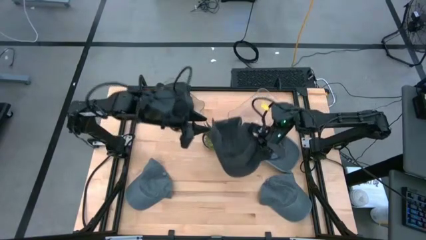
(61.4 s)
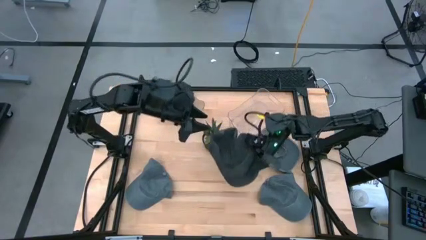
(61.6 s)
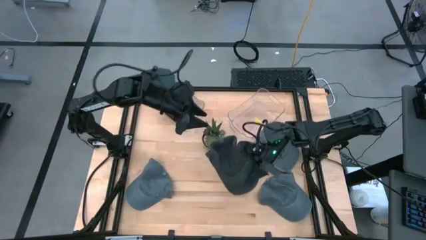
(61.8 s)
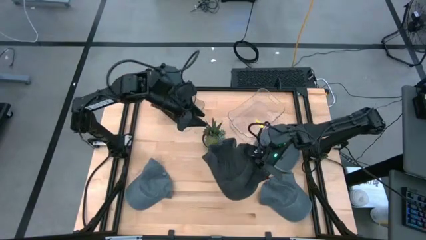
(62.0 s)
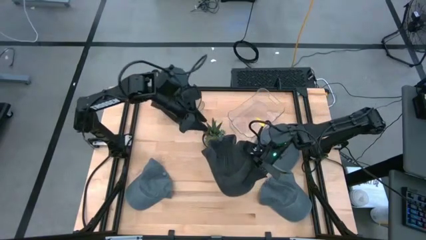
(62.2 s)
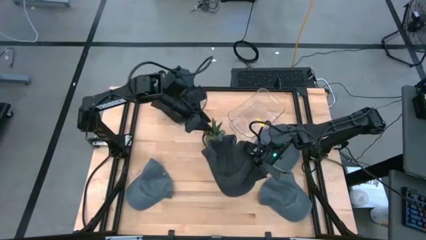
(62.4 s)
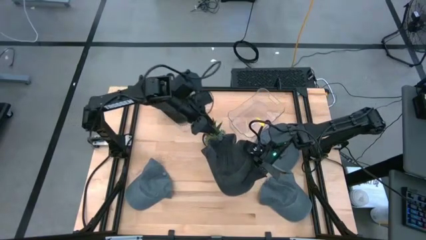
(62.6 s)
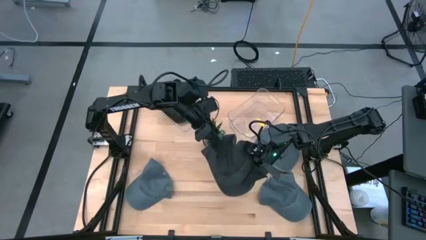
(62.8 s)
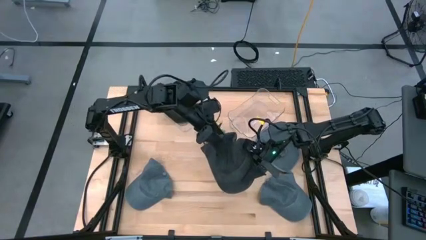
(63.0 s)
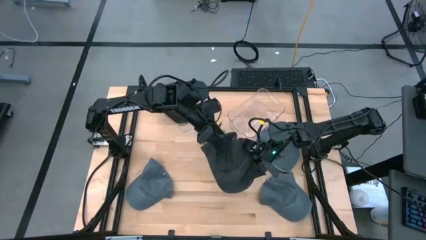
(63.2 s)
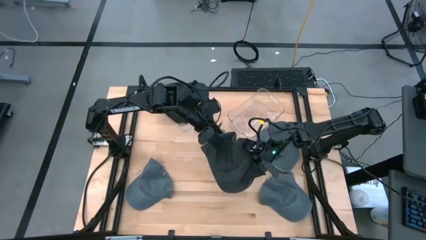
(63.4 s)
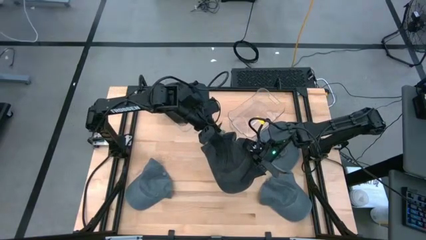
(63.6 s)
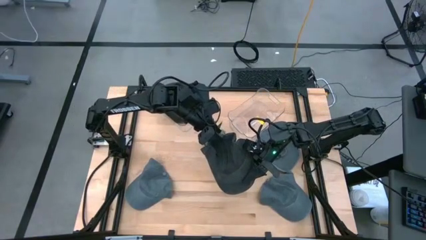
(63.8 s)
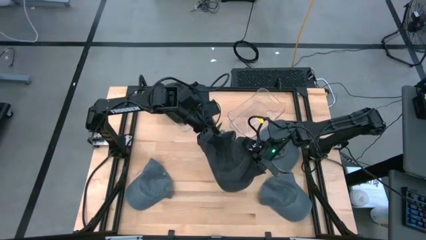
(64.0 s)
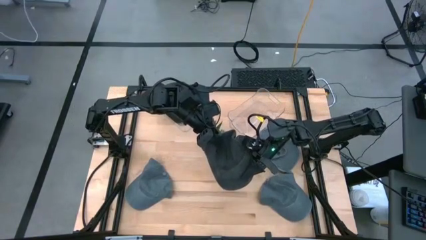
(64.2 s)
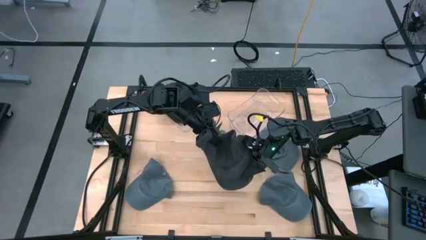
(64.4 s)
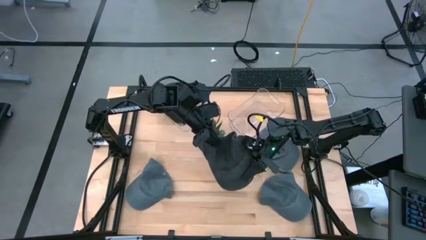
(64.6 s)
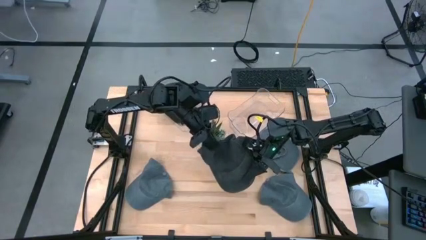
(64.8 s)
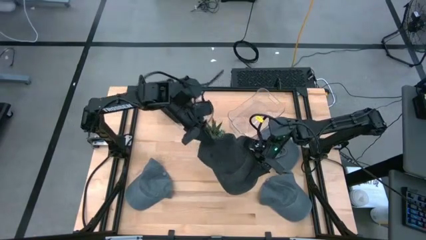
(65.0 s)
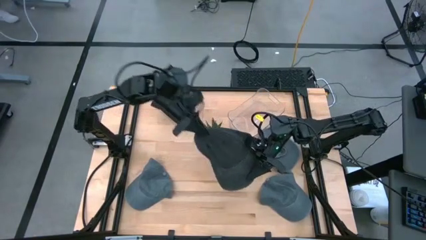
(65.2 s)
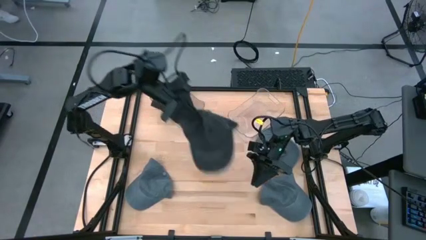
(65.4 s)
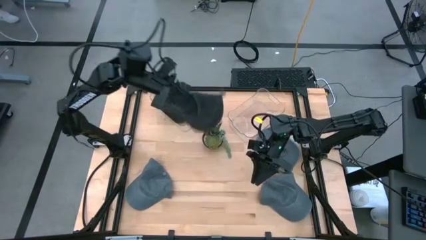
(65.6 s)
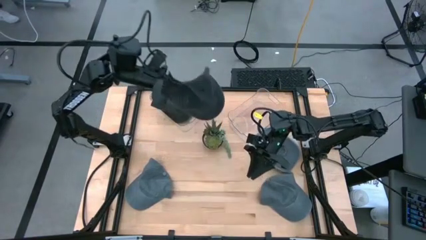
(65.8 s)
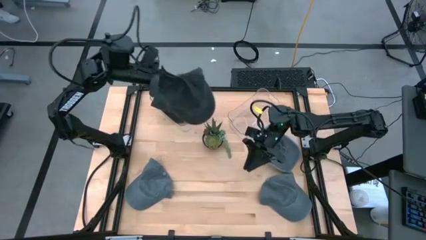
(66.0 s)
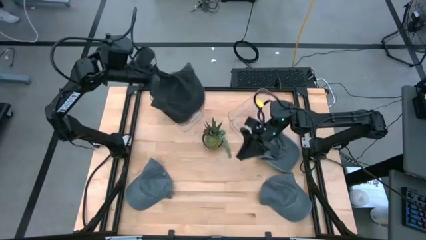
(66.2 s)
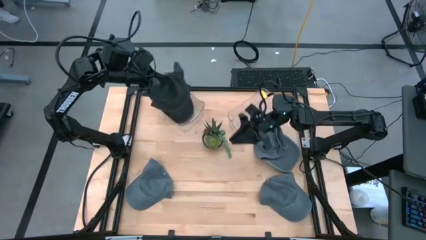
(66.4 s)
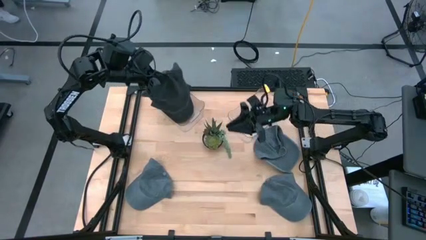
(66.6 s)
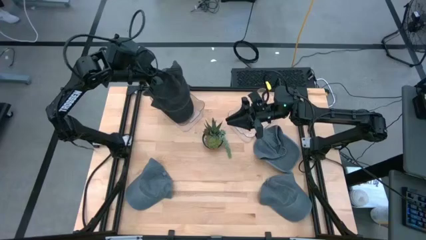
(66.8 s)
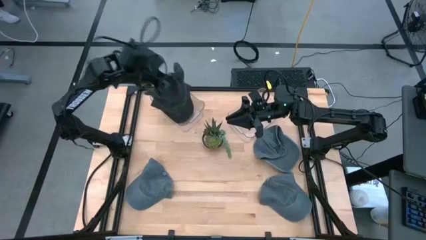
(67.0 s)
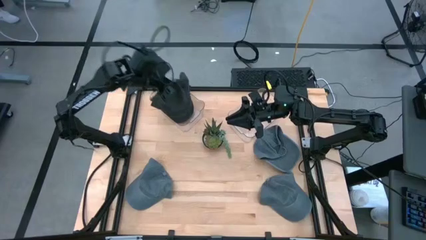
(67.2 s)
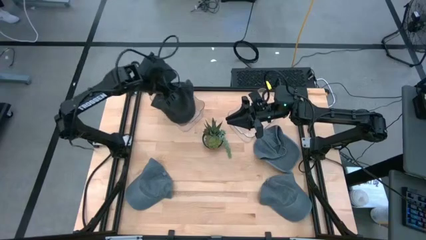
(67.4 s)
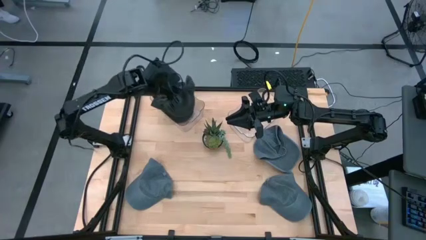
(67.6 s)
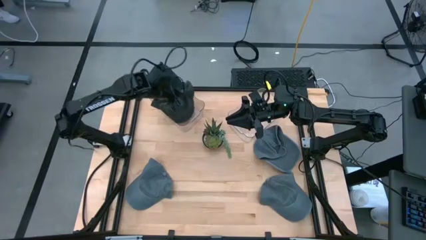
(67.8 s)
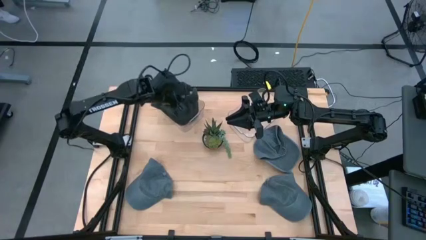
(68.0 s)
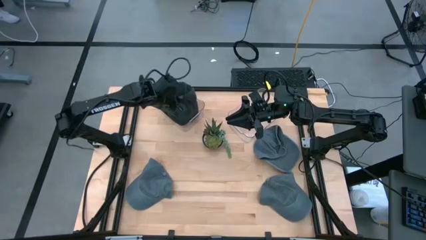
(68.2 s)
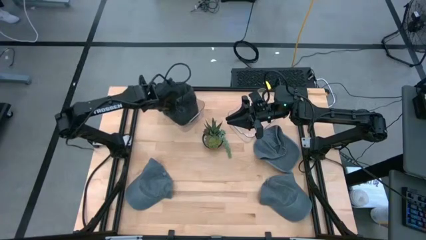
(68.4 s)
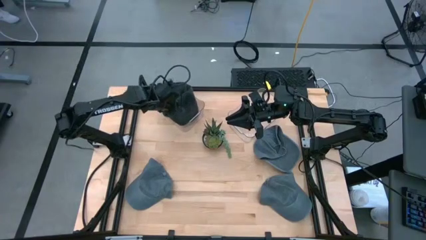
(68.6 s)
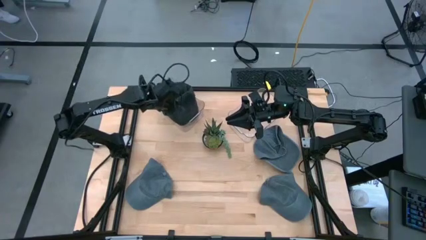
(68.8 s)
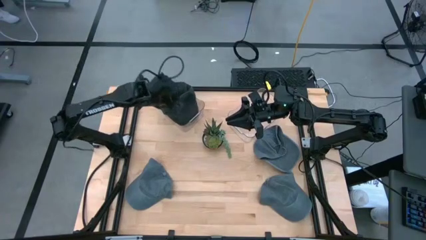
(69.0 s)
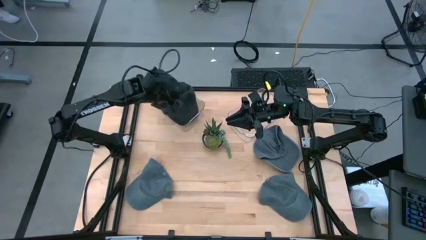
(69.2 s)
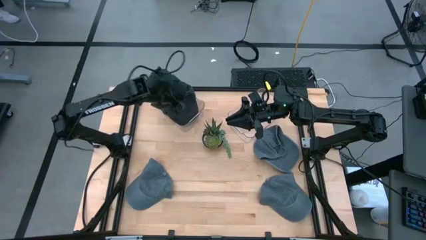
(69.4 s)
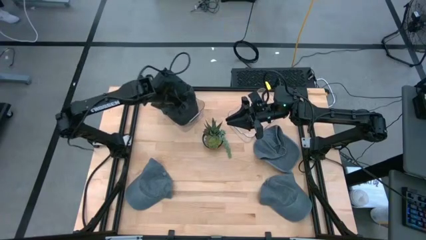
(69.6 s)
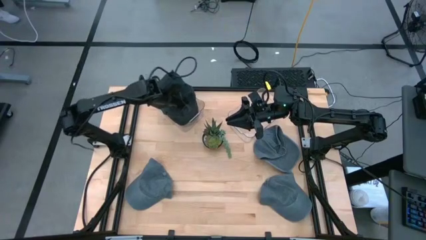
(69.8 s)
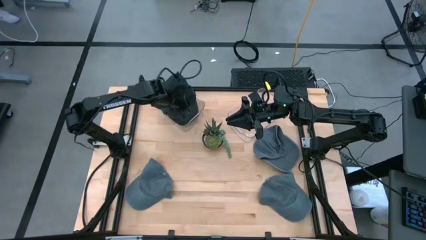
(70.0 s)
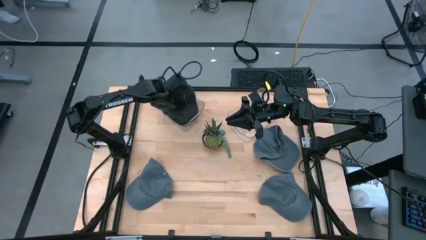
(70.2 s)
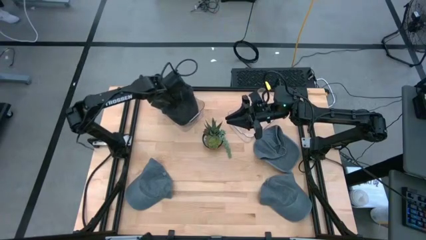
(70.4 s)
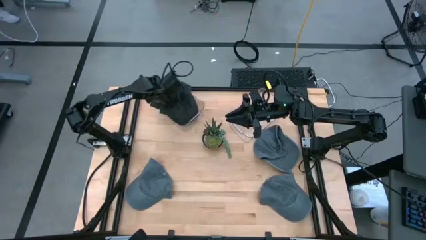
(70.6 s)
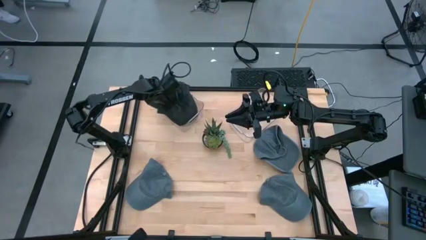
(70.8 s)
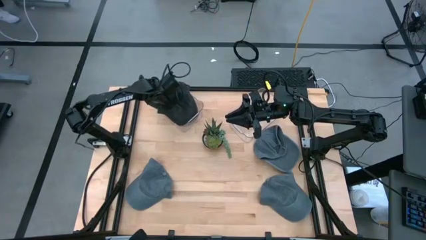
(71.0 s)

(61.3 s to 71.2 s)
Task: Pick & Place hat
Put the black cap into the left transparent bin

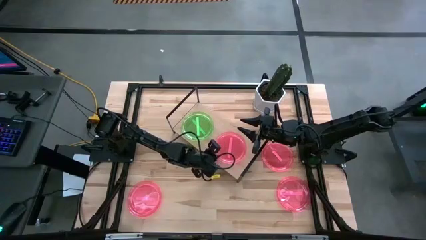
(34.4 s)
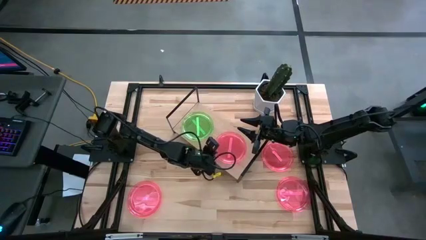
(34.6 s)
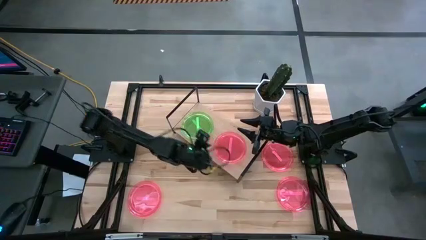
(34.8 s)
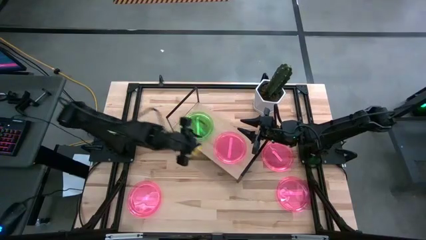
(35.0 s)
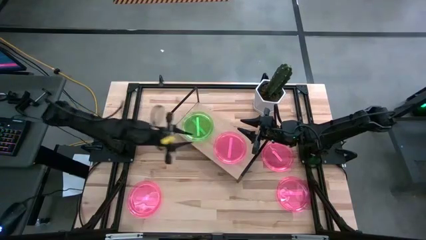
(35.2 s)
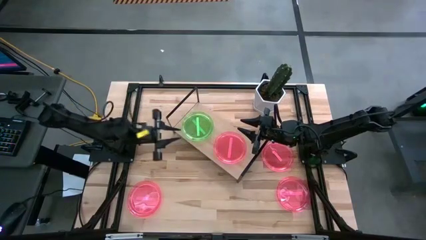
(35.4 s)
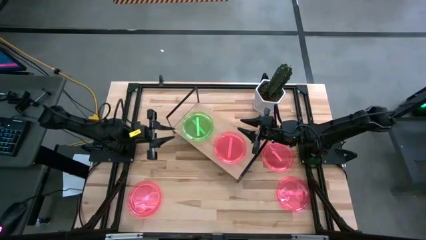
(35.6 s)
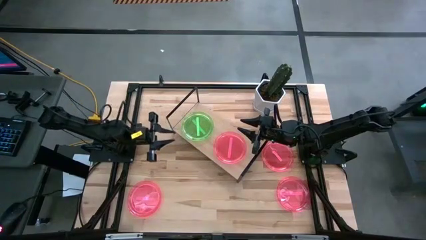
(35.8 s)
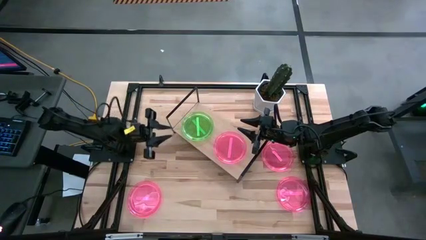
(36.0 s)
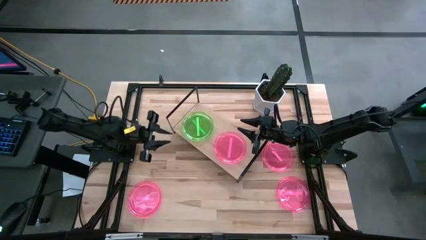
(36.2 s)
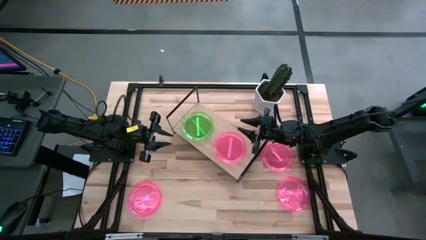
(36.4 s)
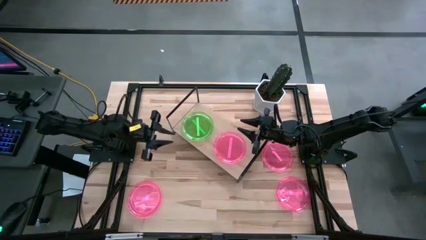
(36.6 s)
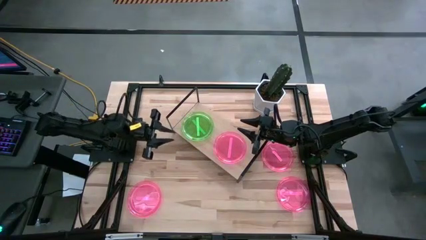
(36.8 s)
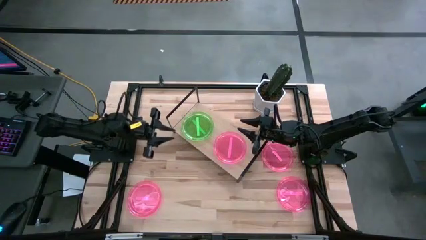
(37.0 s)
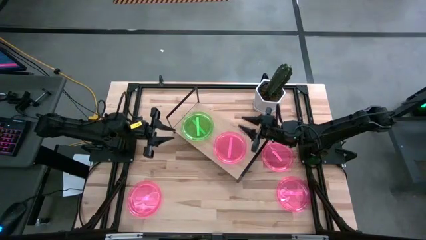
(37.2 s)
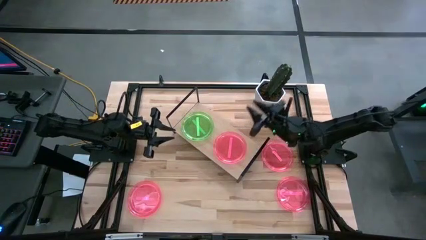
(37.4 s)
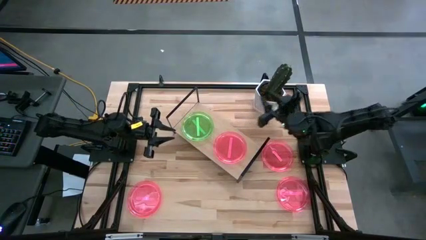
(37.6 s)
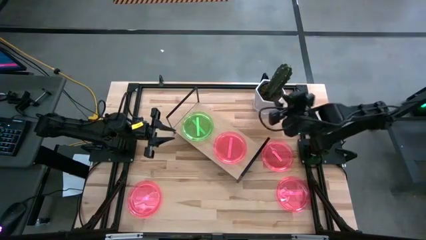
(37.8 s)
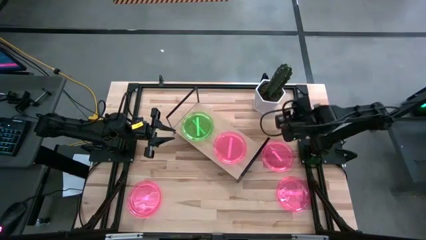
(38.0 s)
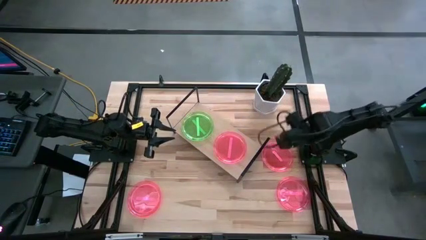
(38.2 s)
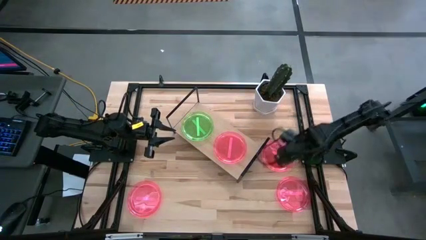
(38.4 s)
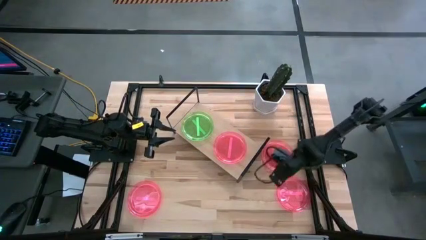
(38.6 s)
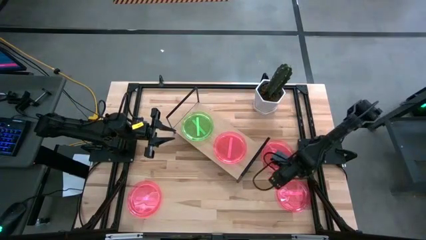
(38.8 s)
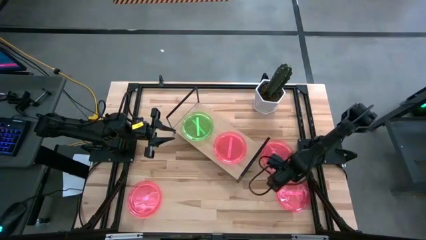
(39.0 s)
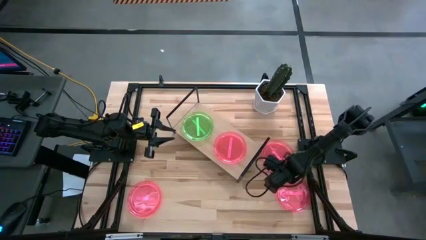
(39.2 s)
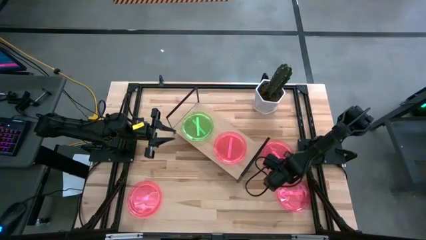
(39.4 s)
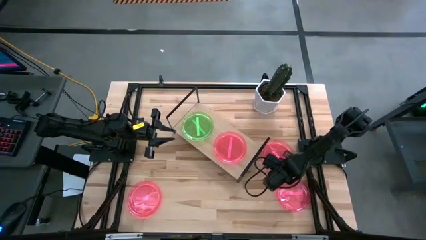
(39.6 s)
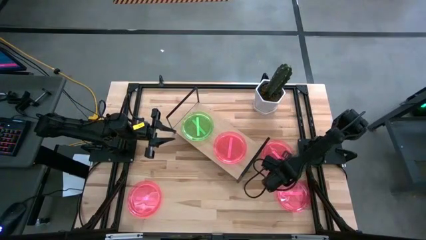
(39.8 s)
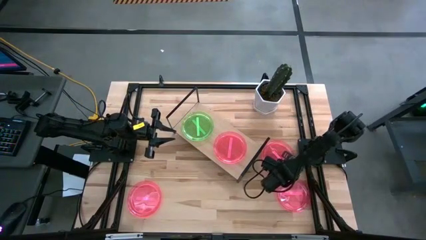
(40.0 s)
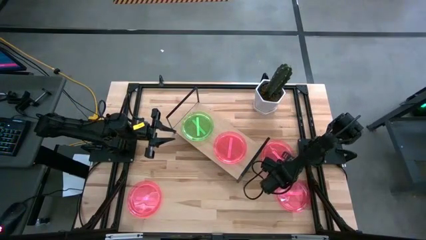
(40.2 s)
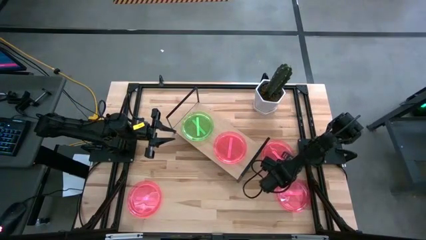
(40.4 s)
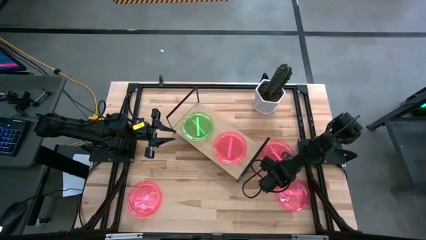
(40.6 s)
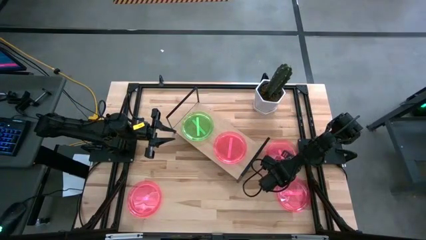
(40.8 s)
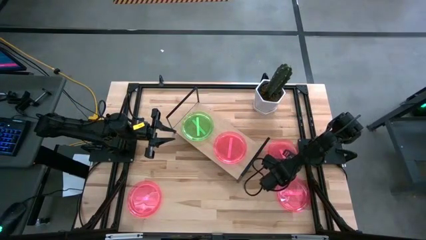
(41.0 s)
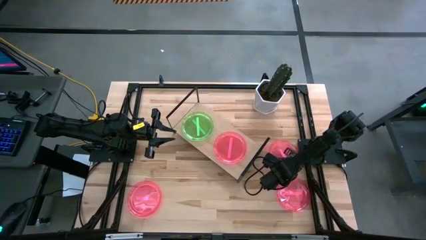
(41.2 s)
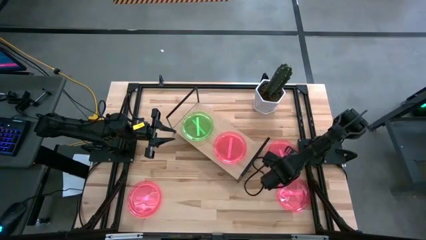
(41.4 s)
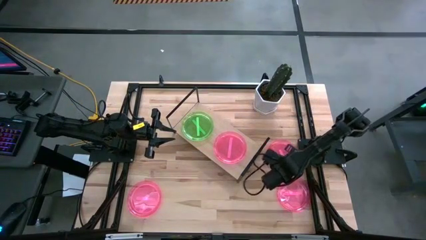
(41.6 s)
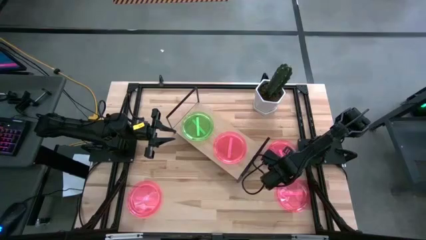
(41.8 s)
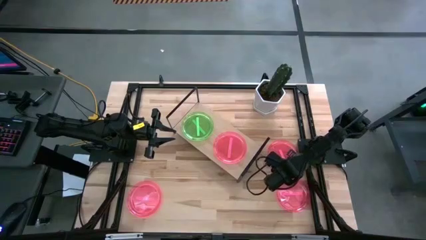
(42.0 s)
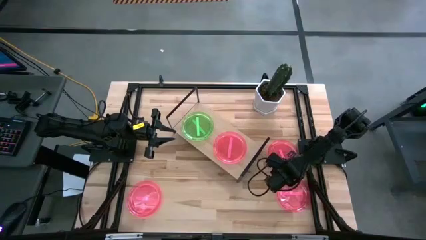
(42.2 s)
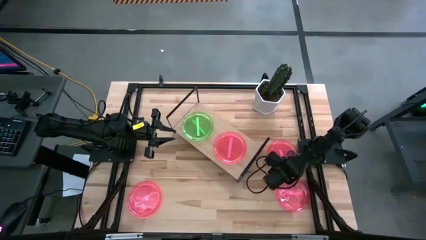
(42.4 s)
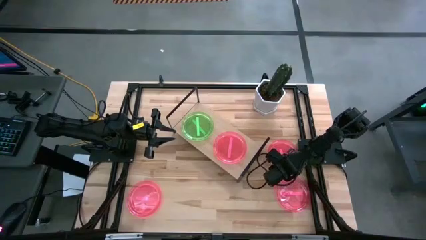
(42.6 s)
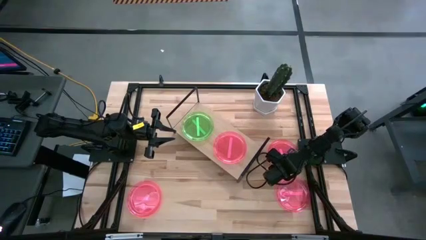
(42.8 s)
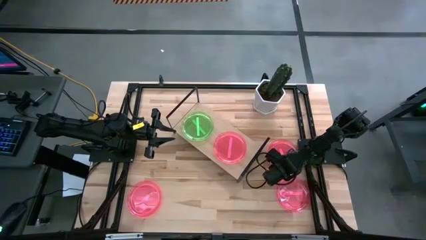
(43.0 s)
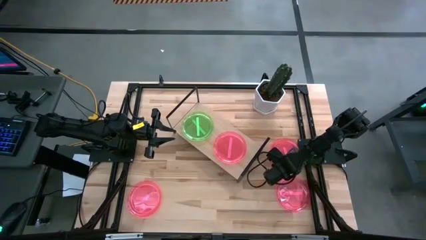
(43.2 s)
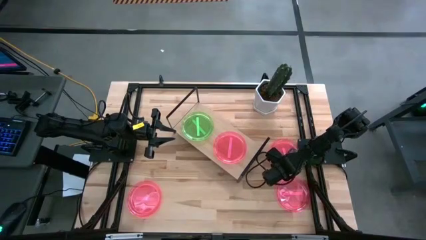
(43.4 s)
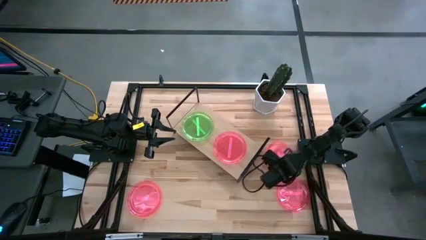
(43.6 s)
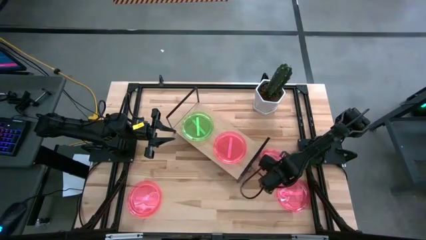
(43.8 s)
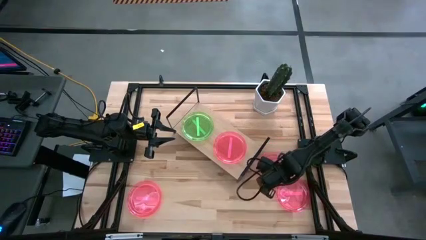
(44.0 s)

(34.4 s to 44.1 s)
Task: Place and stack plates onto a shelf
Stack the pink plate on top of the other pink plate on the shelf
